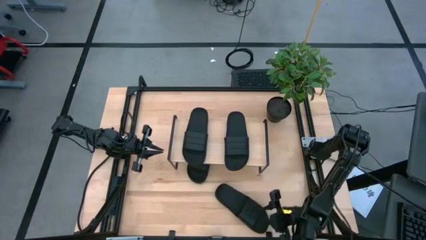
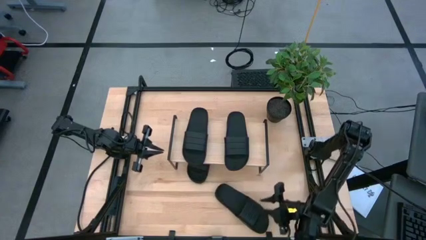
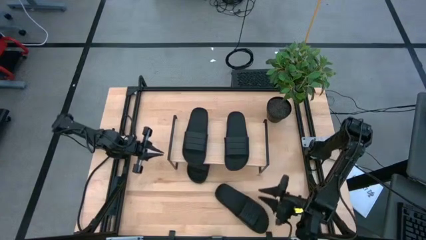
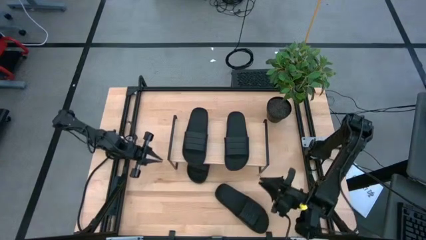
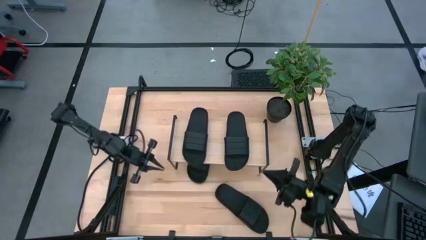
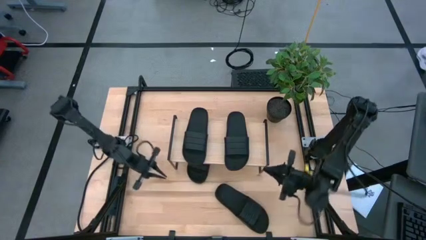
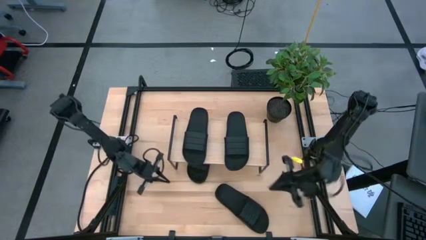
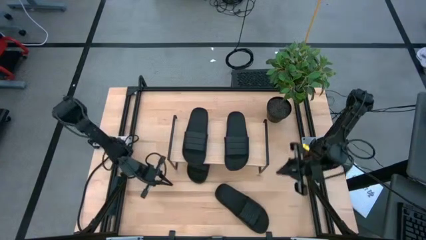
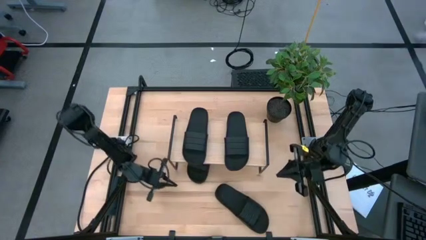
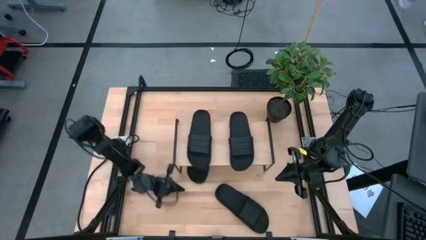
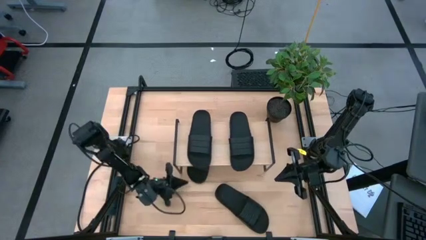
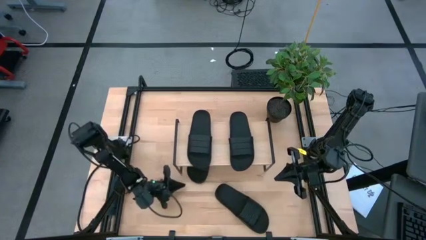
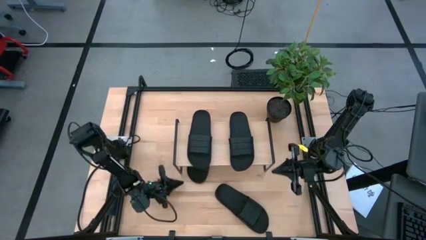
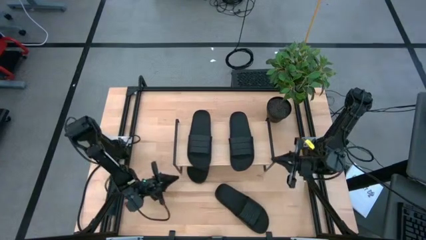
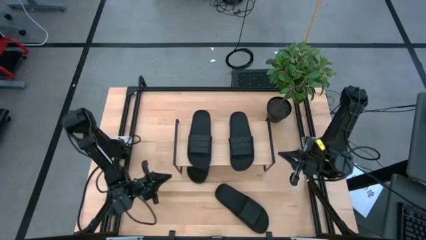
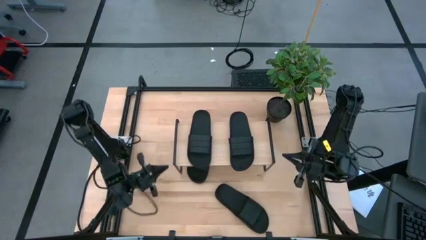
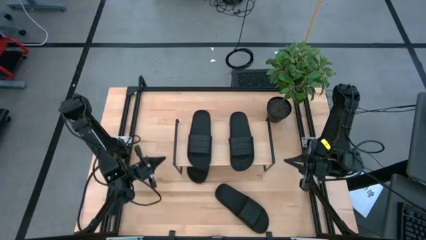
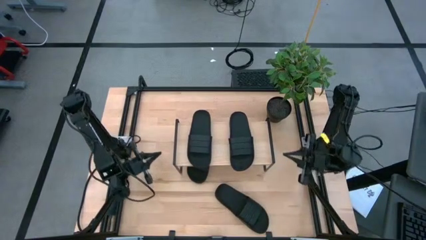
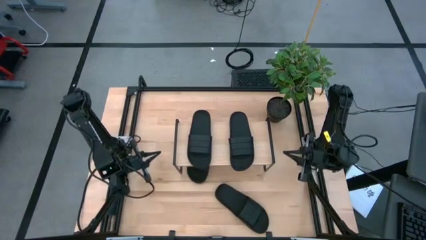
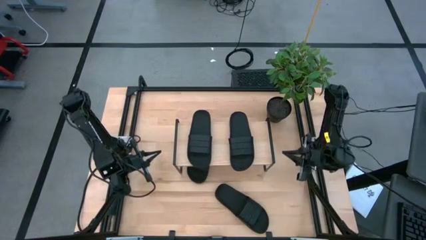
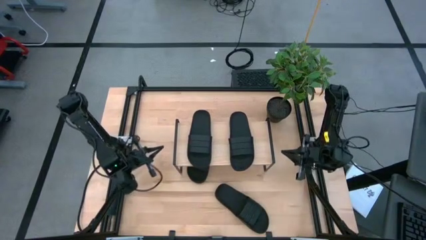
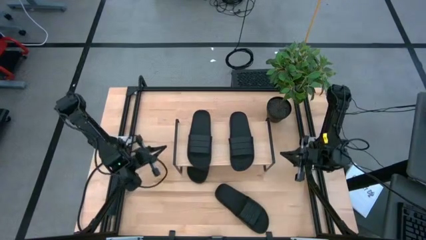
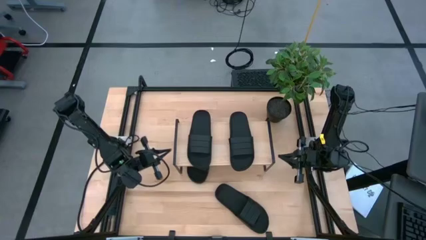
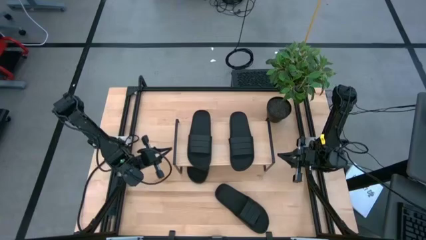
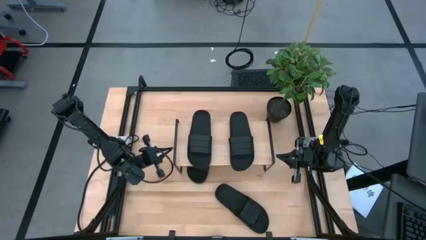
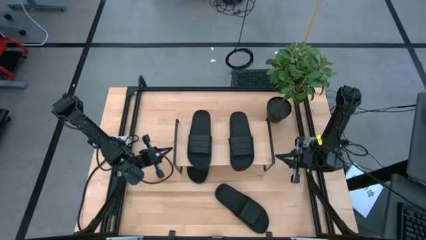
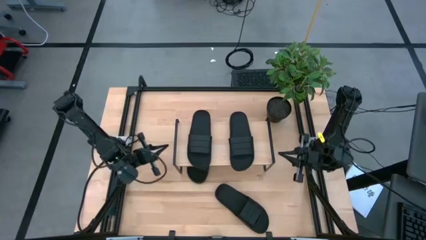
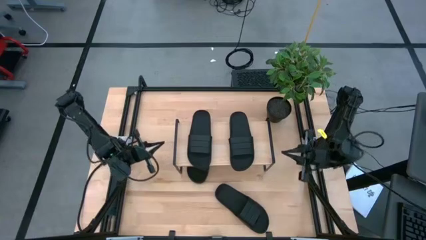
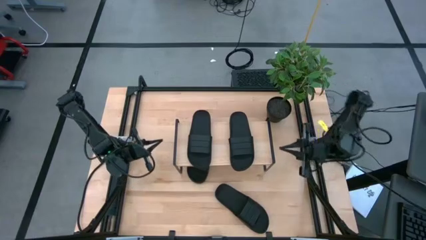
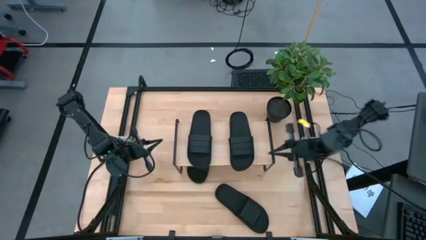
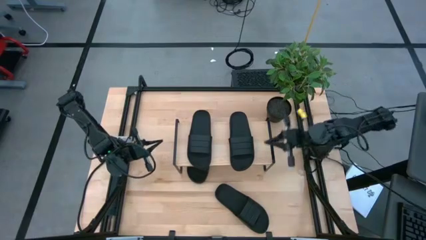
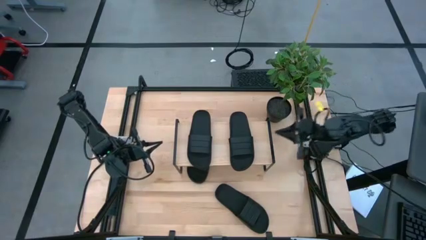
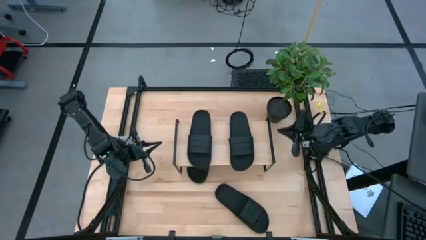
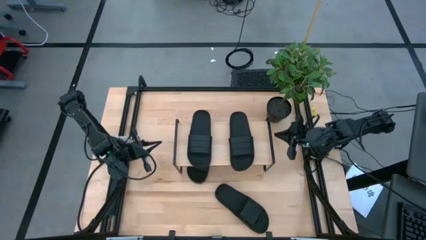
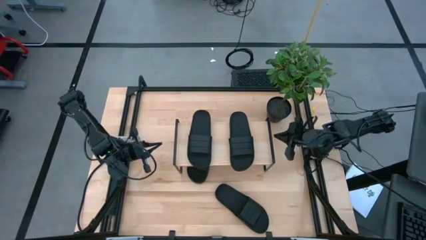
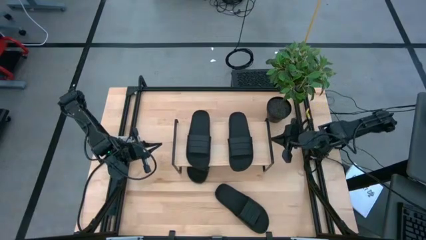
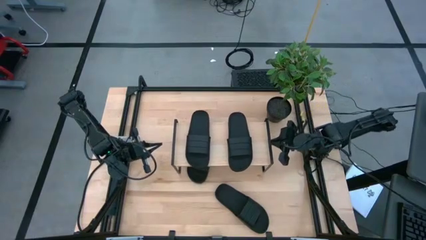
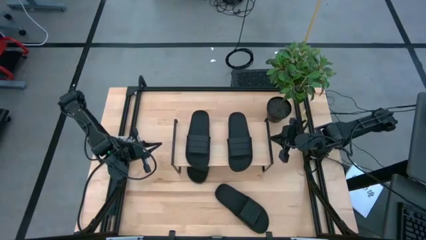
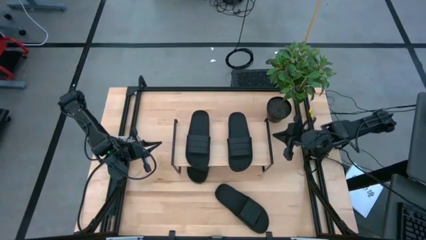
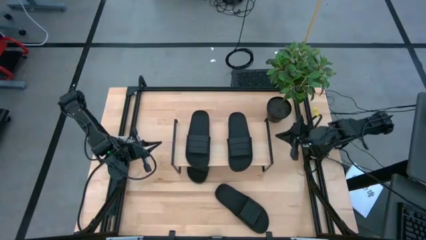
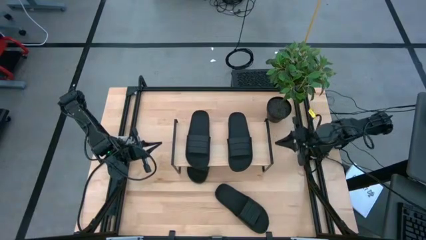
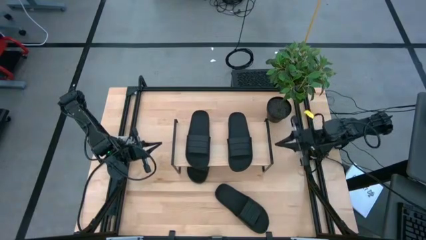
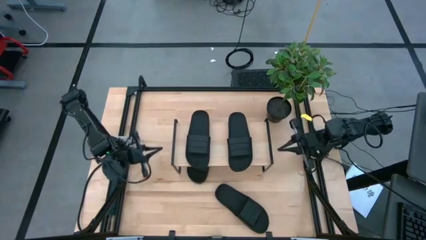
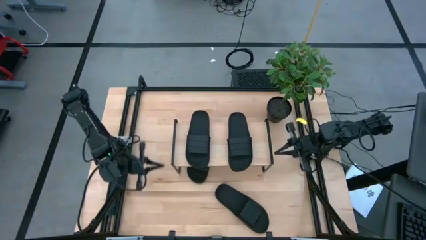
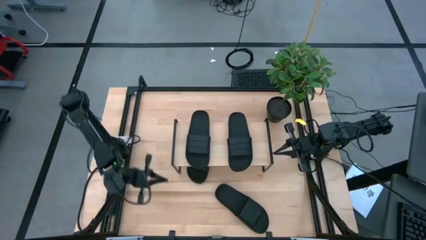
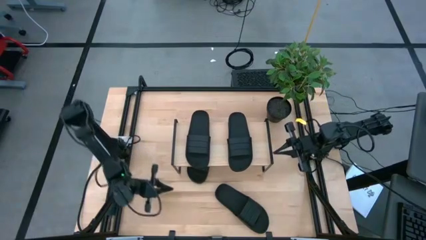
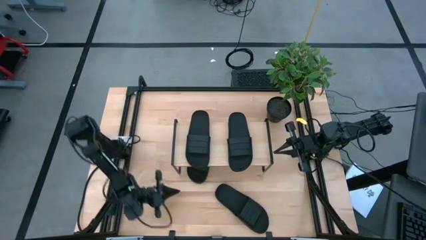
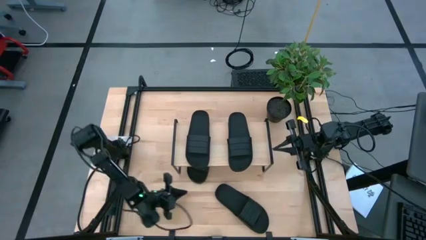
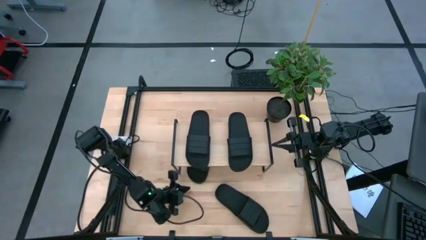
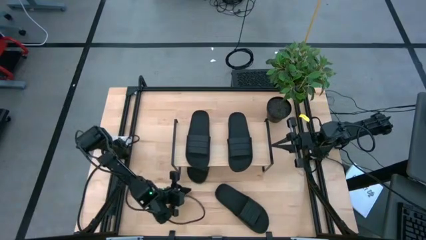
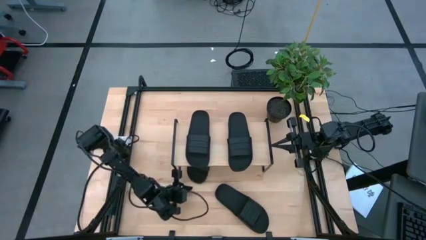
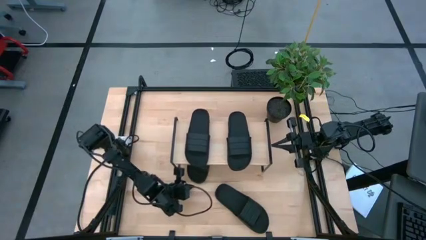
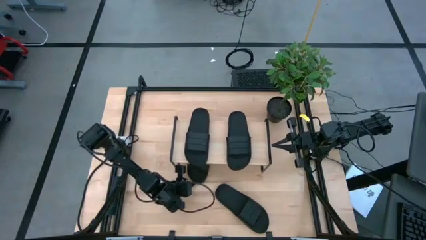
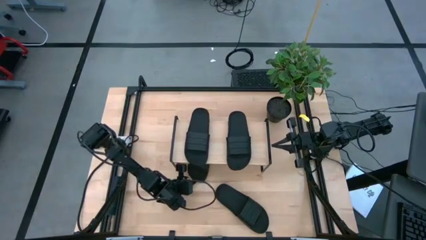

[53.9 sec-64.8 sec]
Task: Pick and place slides into the shelf
Adjust the shelf

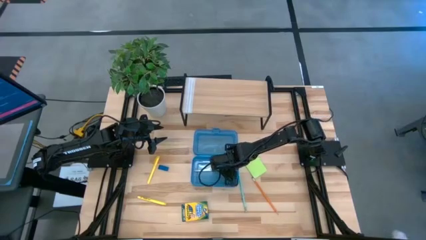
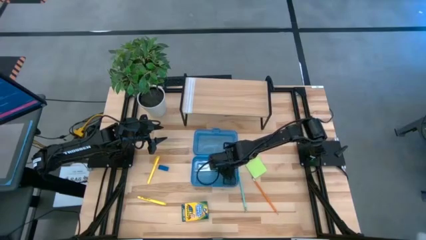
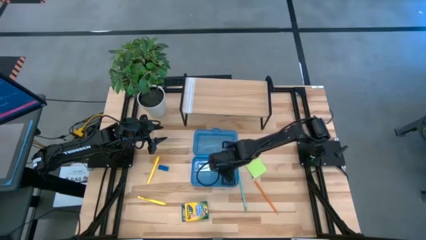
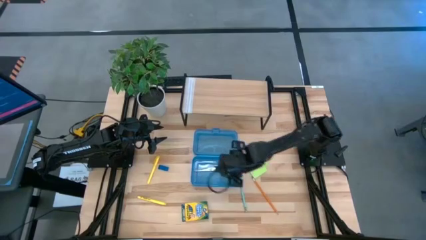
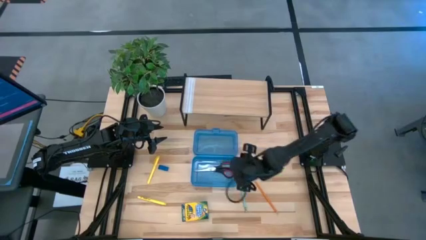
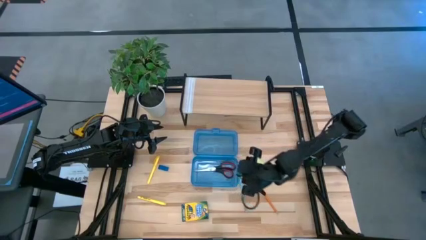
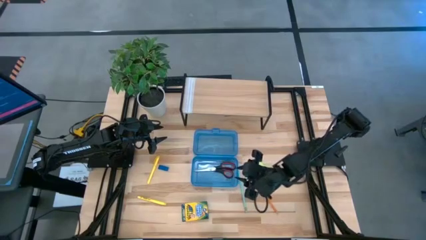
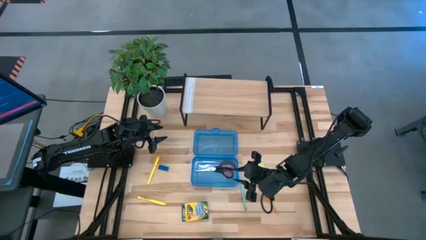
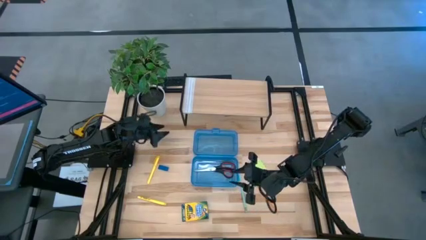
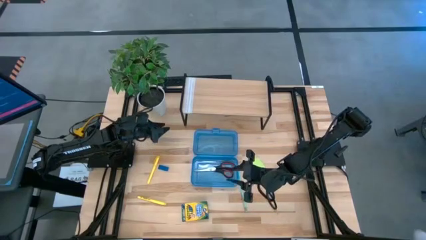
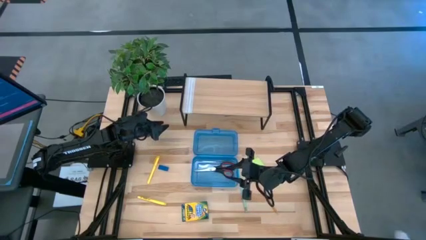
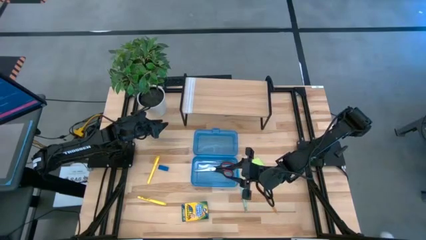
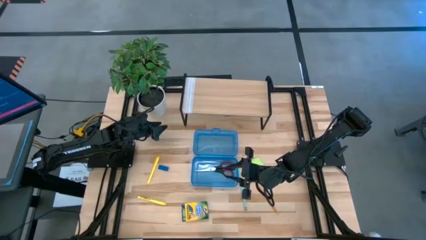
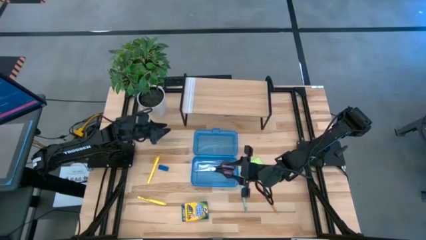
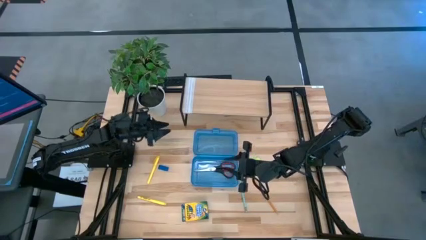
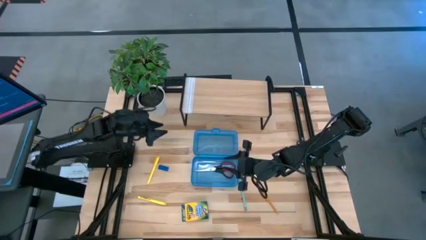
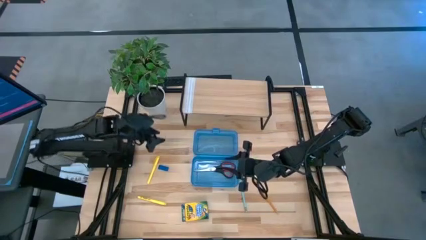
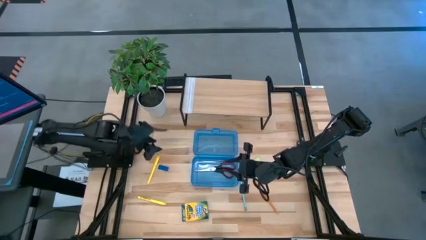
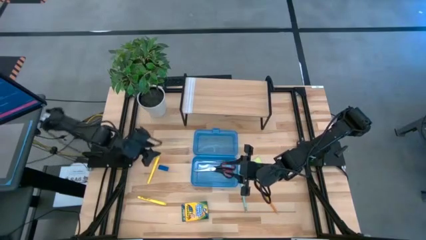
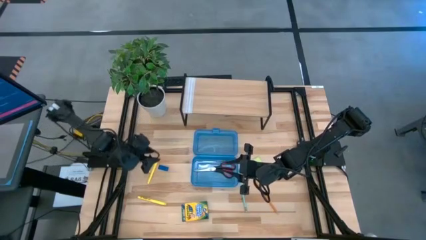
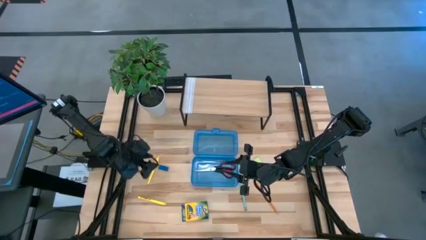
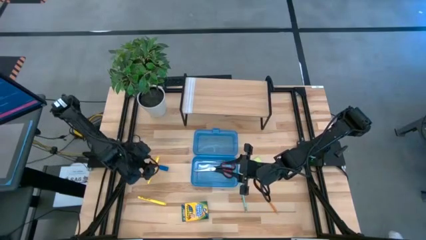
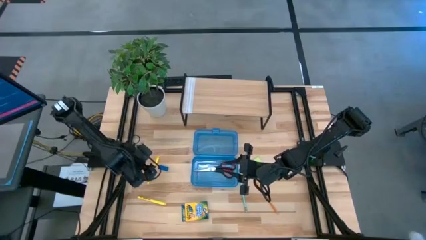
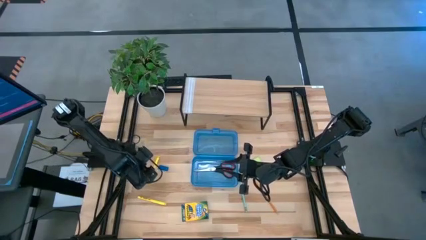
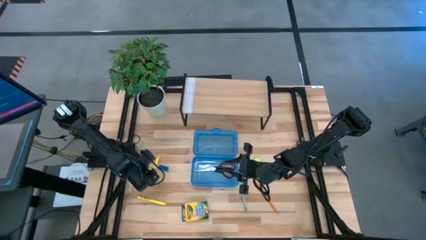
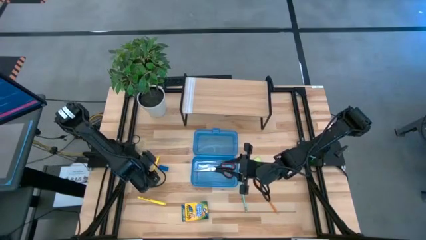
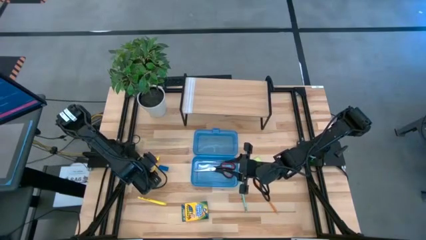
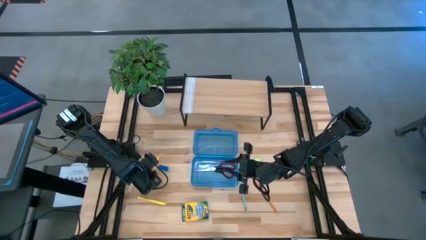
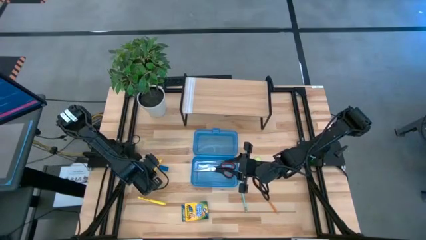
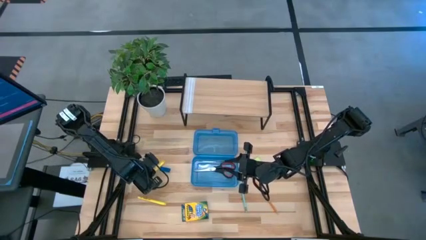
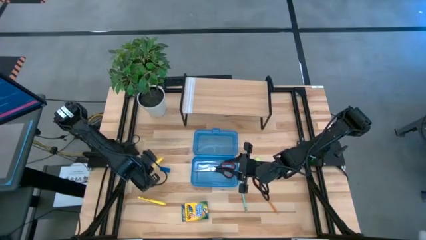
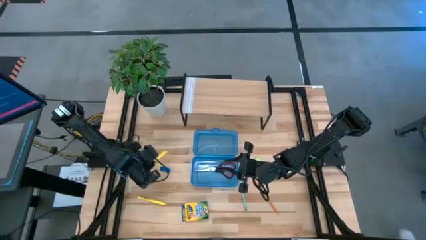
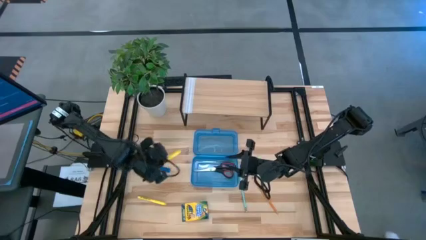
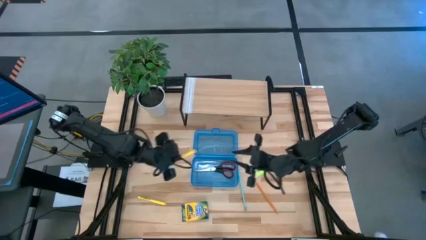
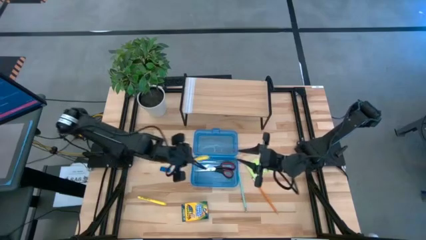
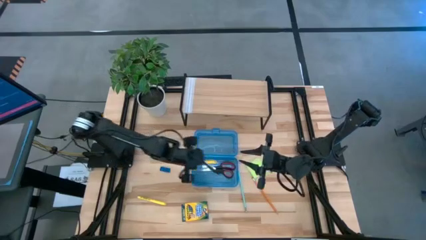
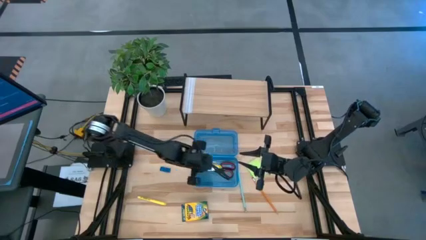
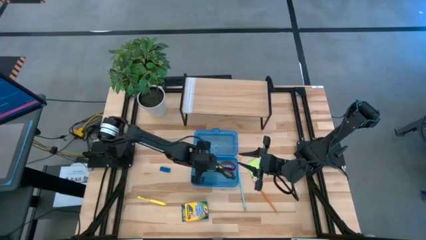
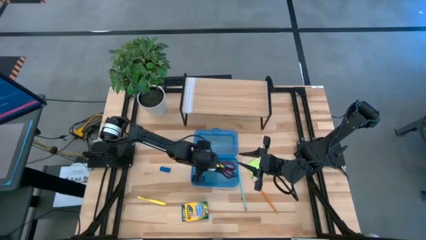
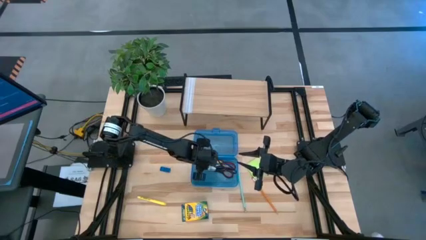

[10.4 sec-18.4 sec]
Task: Pack school essentials
Put the top yellow pen into the blue supply box
